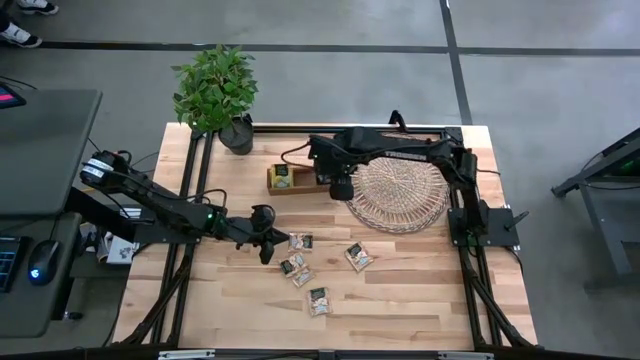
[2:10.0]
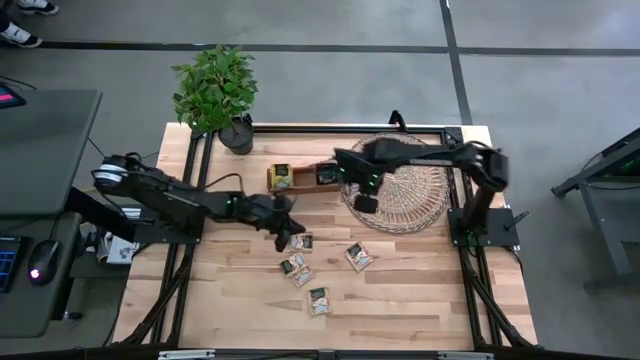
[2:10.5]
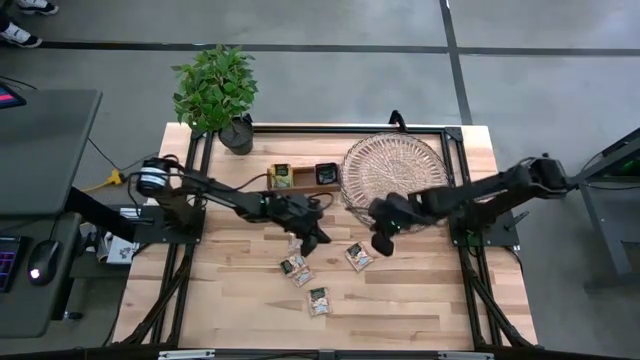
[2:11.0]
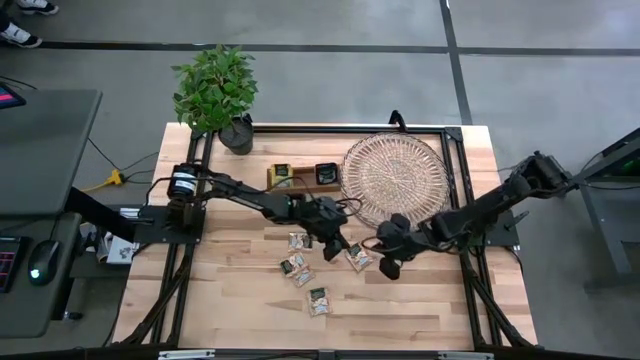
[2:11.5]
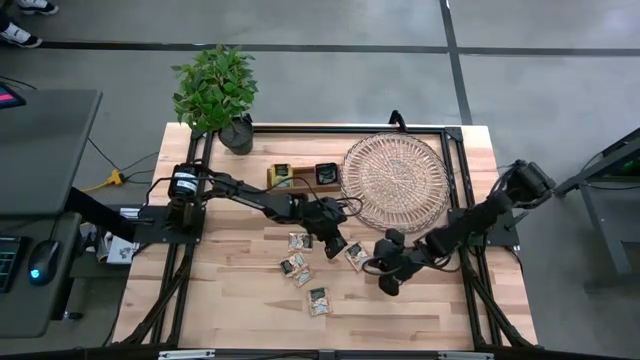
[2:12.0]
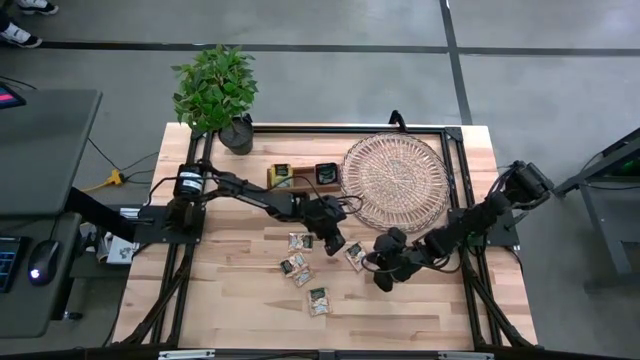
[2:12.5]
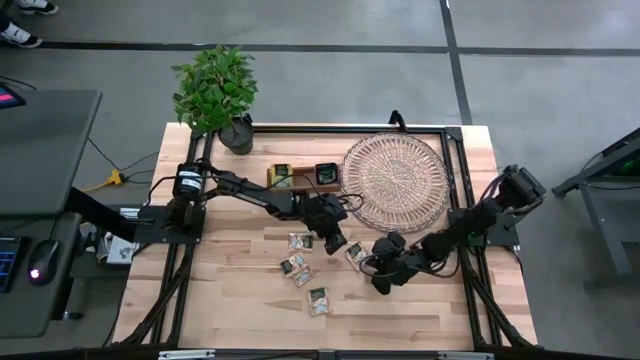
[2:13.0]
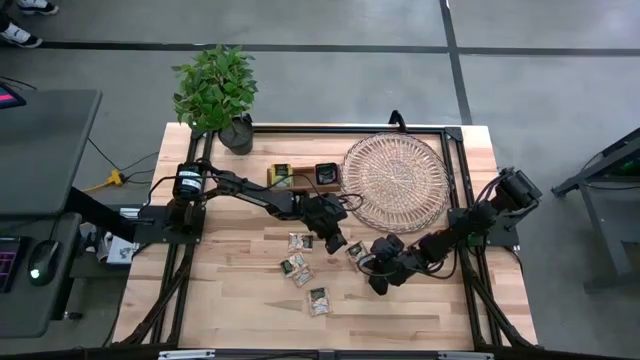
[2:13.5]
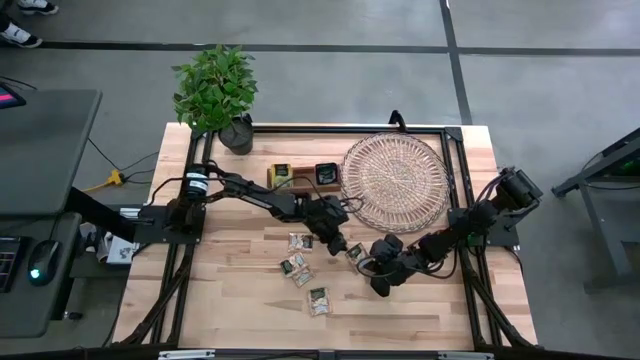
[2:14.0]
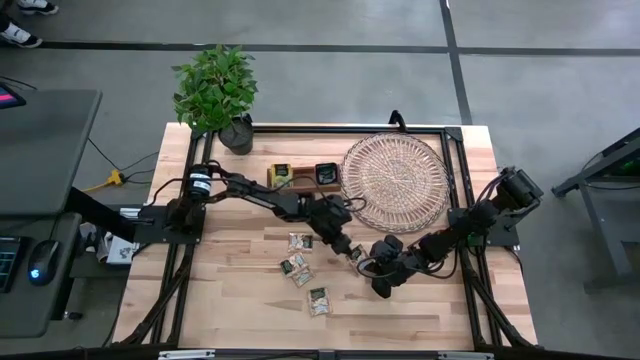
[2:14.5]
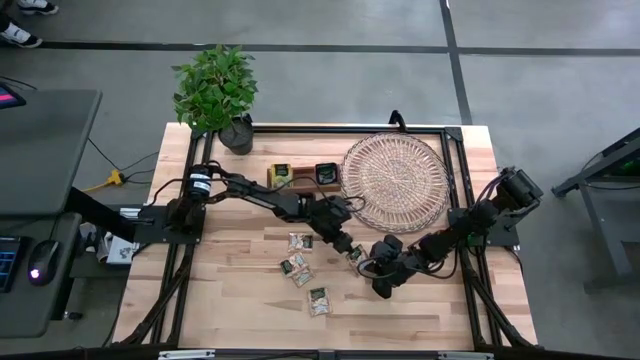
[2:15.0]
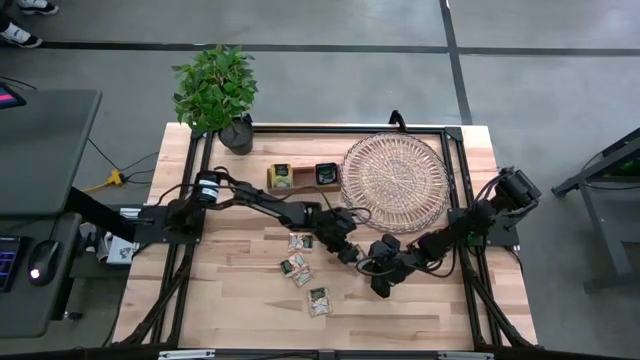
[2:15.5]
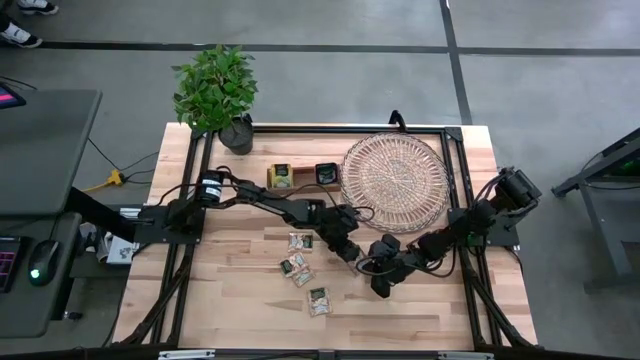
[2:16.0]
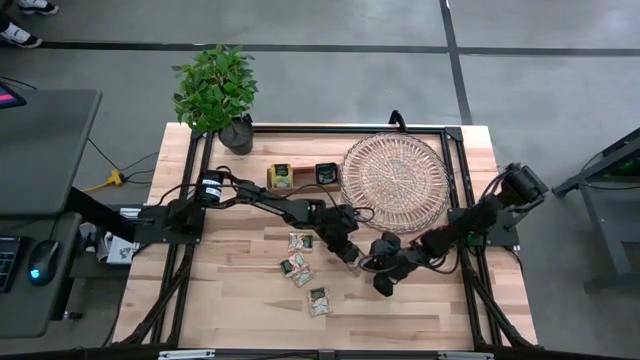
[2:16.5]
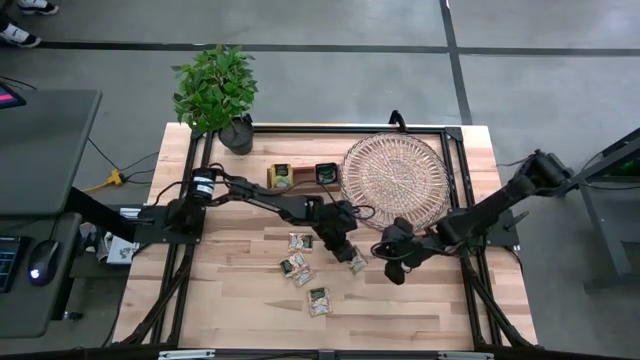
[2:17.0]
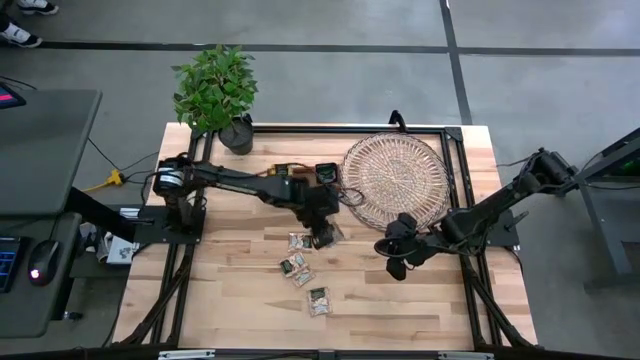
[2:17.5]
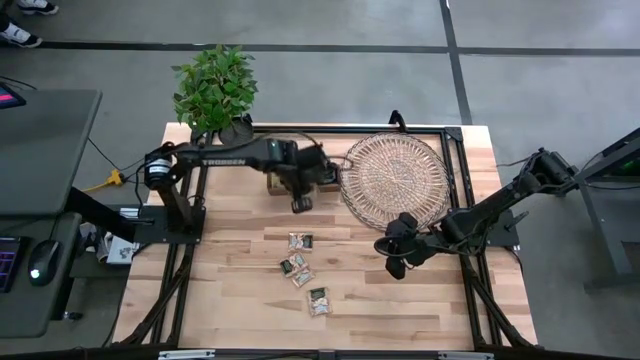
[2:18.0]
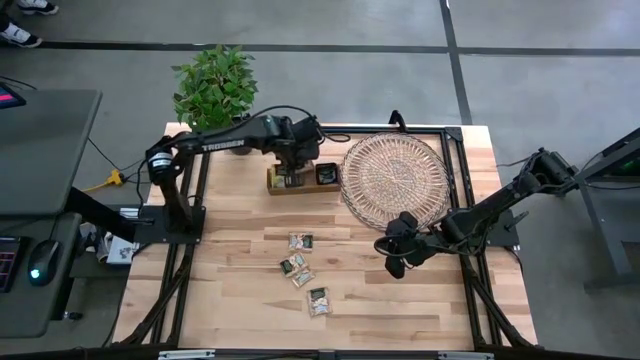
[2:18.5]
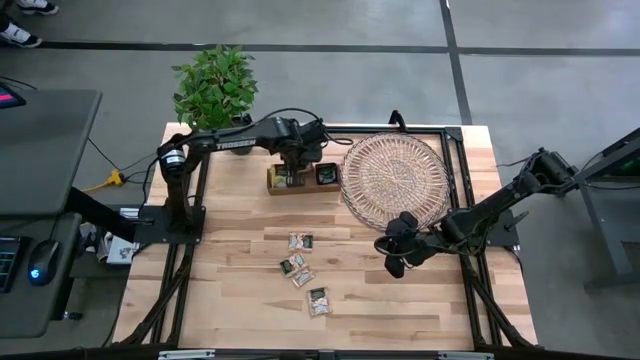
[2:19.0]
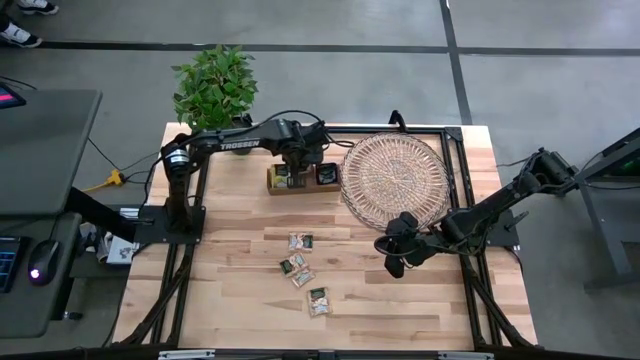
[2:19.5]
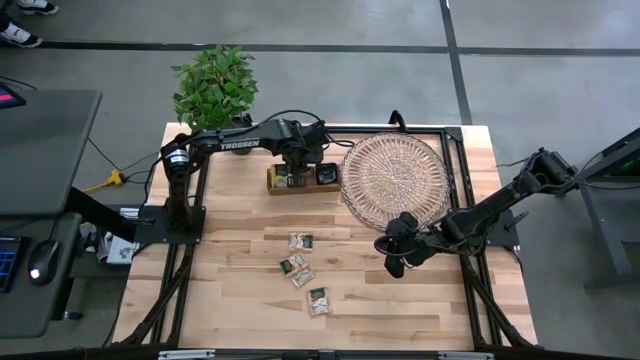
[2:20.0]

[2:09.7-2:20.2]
Task: Pick & Place Tea
Put the brown tea bag into the middle section of the wooden organizer

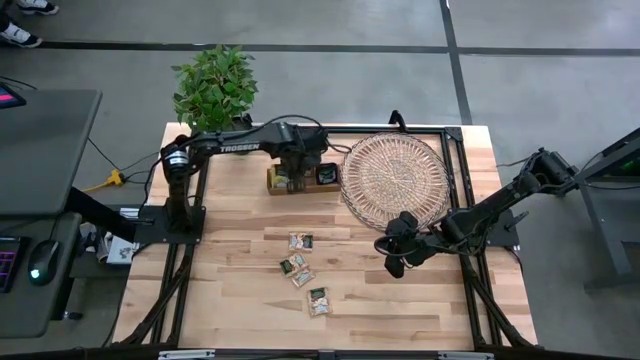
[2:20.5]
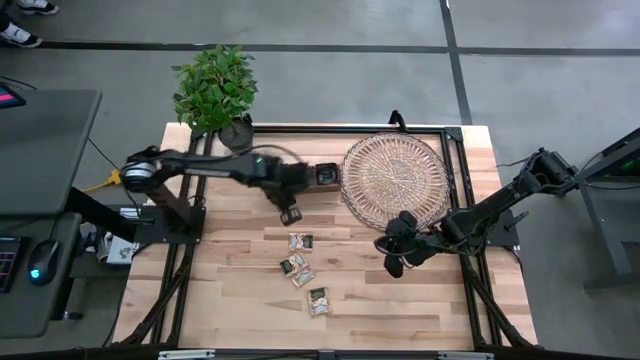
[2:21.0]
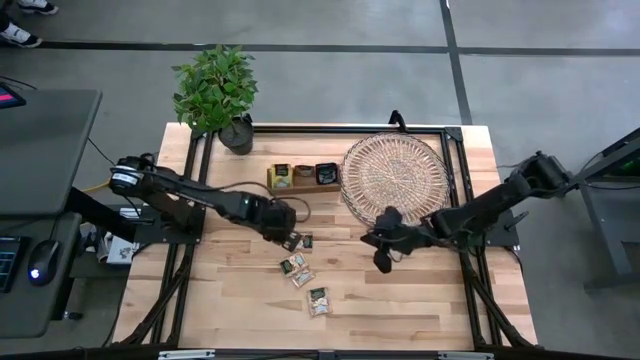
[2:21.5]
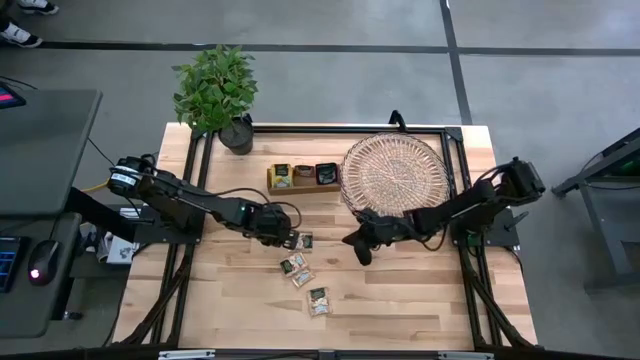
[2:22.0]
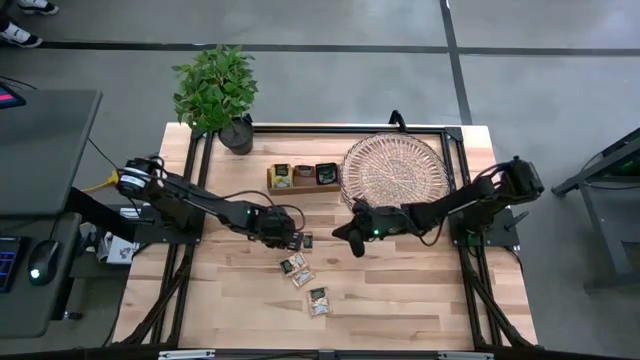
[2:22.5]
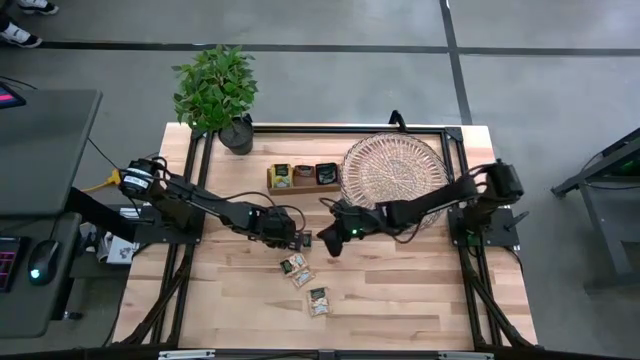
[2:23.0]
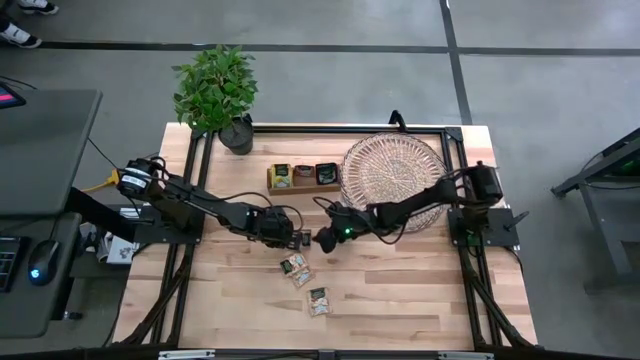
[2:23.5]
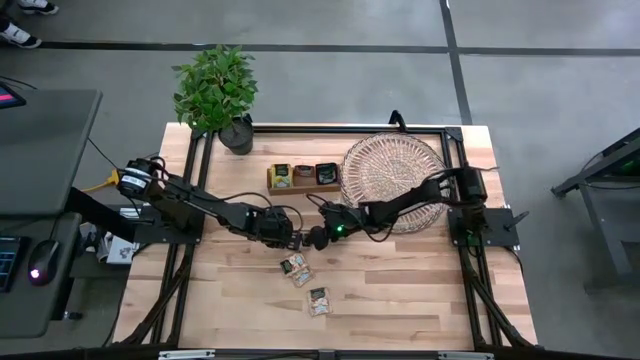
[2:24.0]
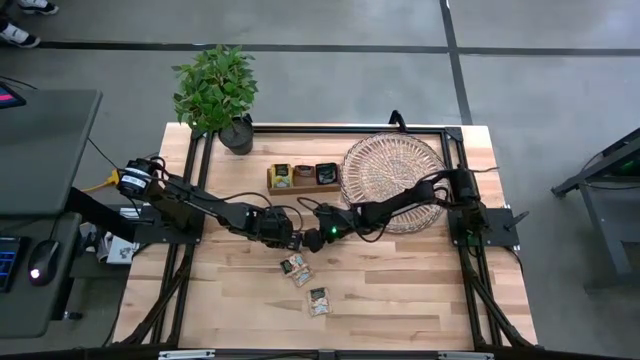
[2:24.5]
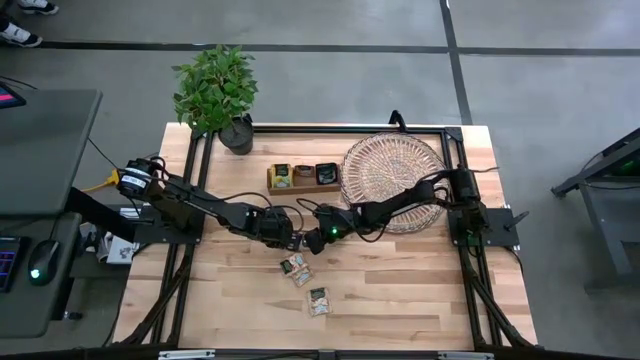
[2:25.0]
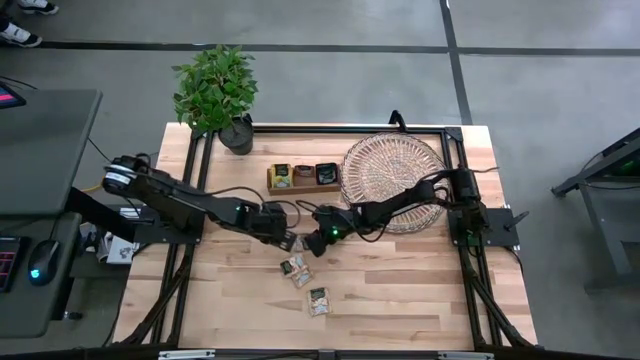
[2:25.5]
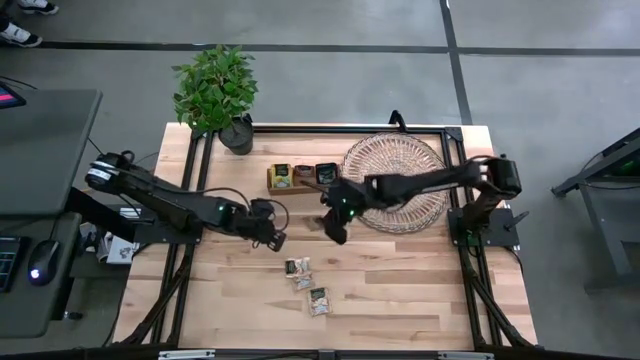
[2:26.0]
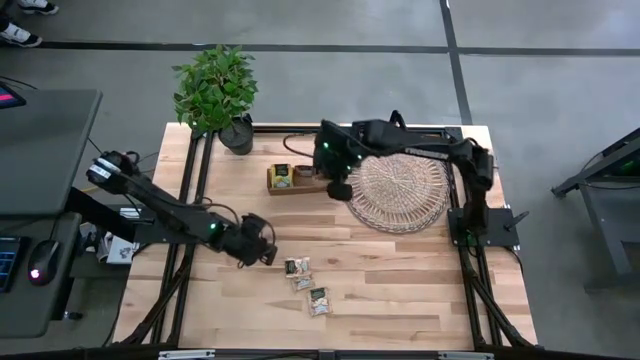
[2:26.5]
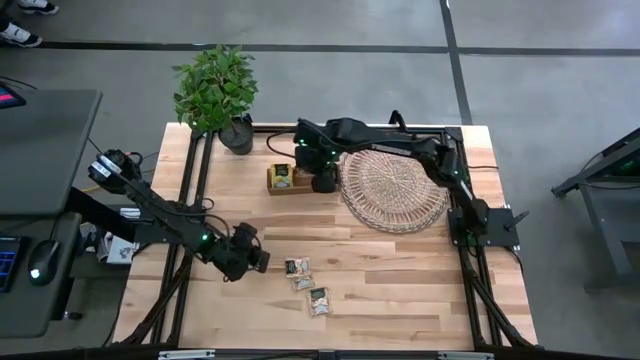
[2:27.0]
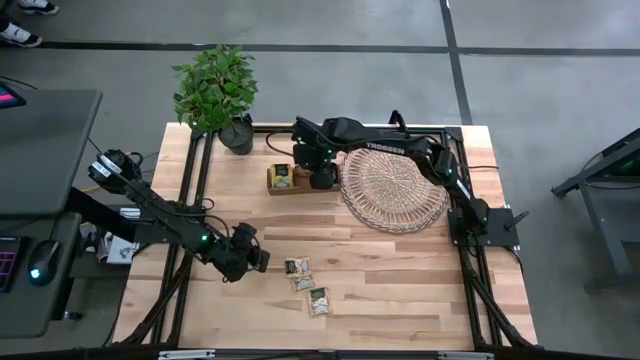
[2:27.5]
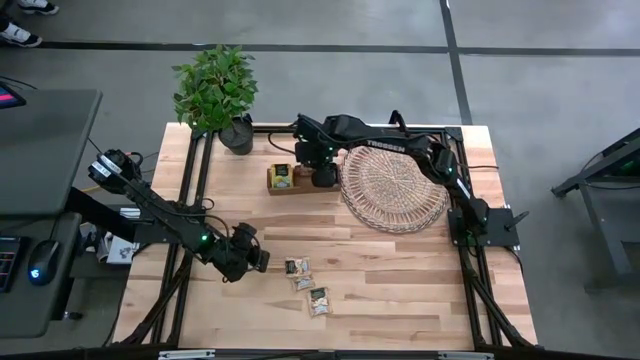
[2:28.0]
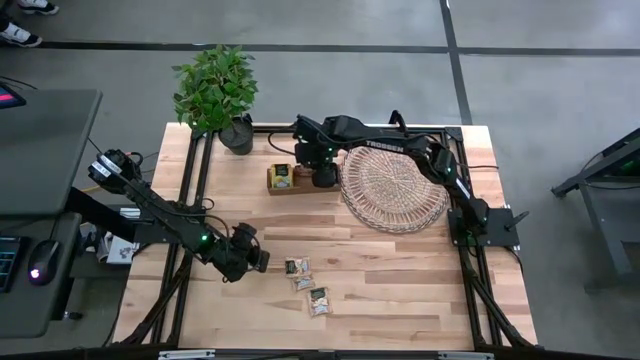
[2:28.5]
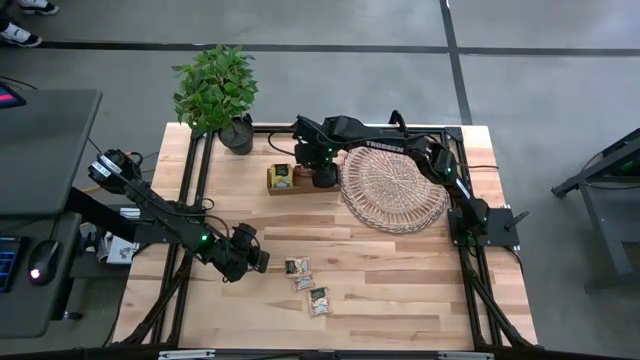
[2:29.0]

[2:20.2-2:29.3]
Put the brown tea bag into the middle section of the wooden organizer
